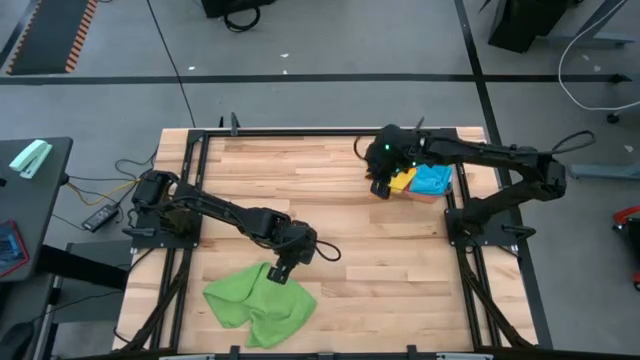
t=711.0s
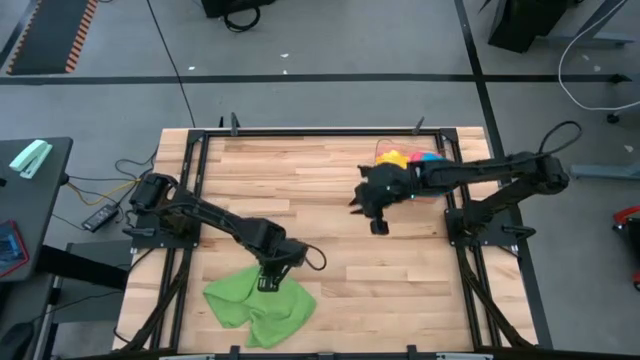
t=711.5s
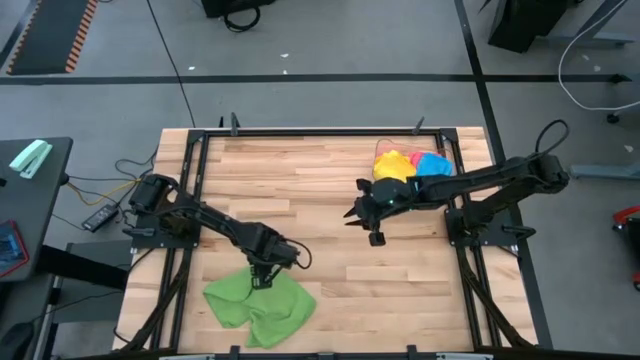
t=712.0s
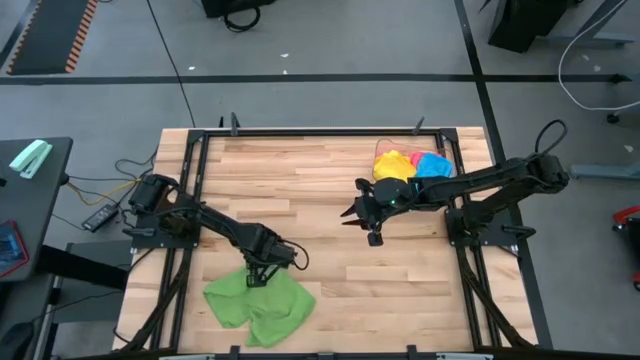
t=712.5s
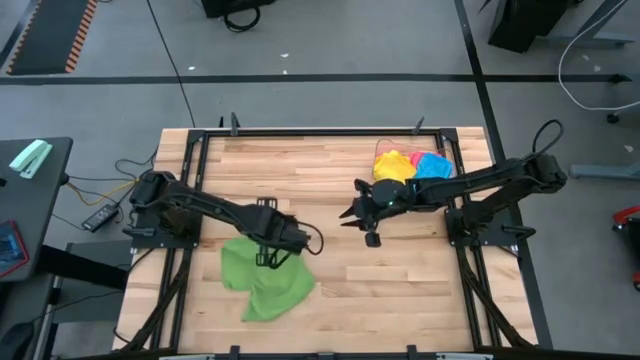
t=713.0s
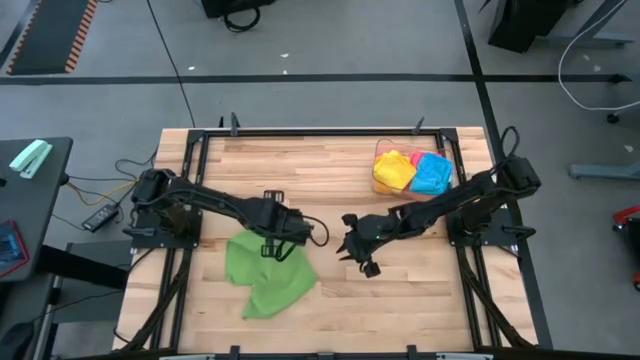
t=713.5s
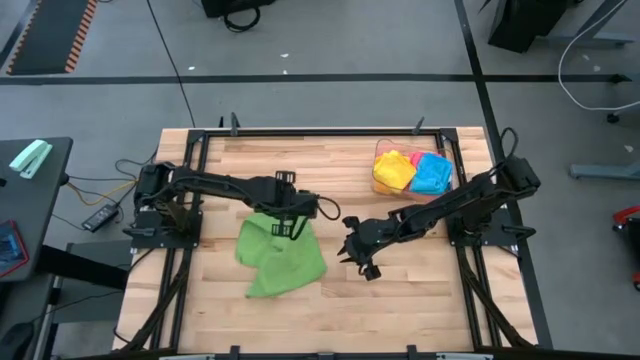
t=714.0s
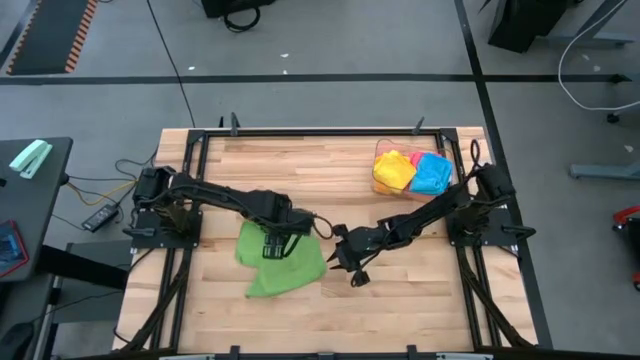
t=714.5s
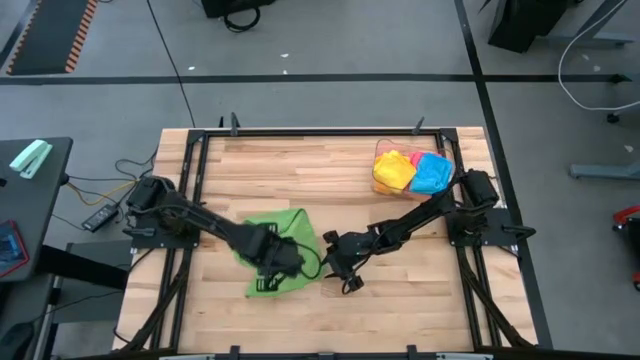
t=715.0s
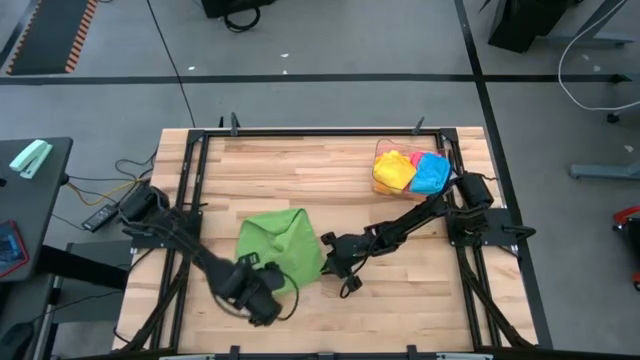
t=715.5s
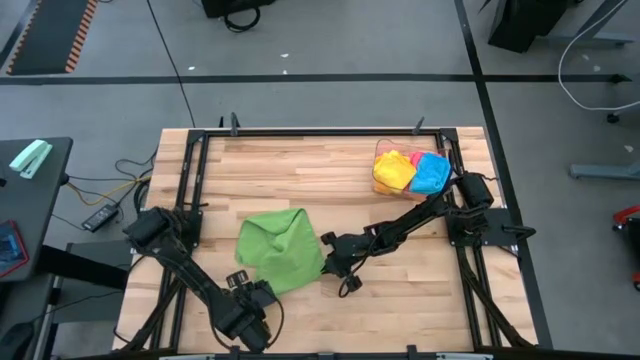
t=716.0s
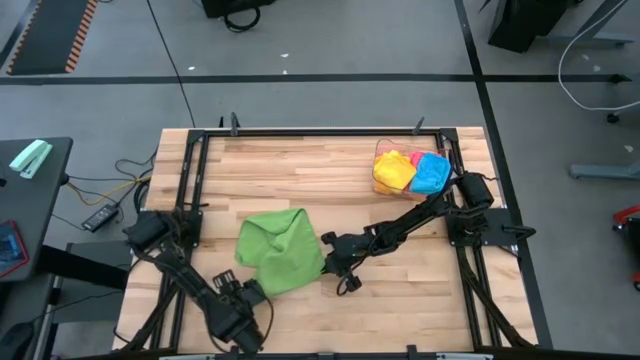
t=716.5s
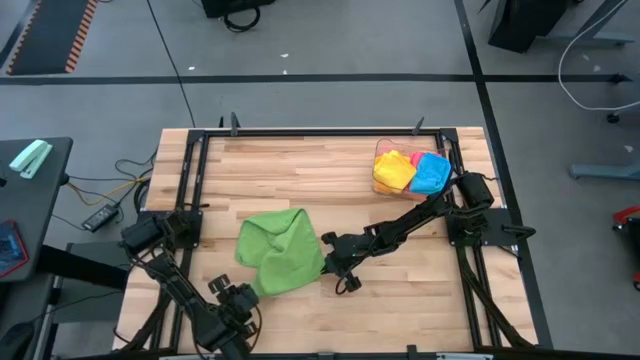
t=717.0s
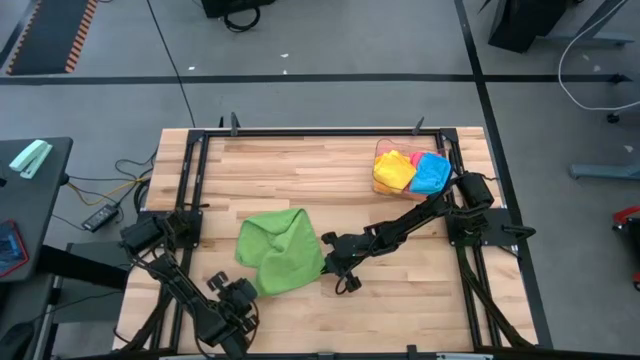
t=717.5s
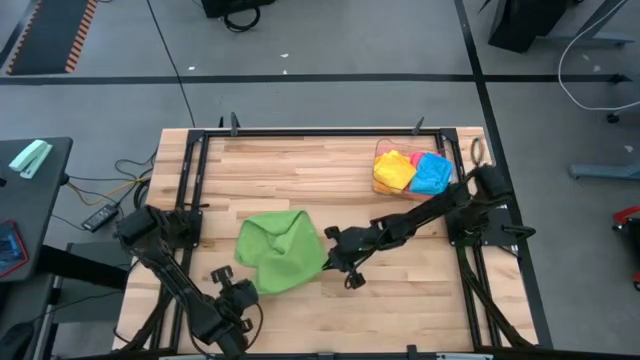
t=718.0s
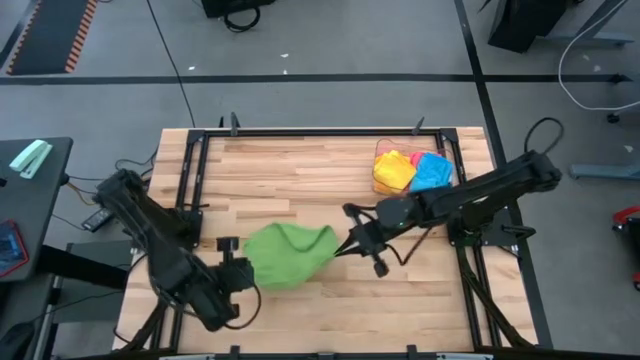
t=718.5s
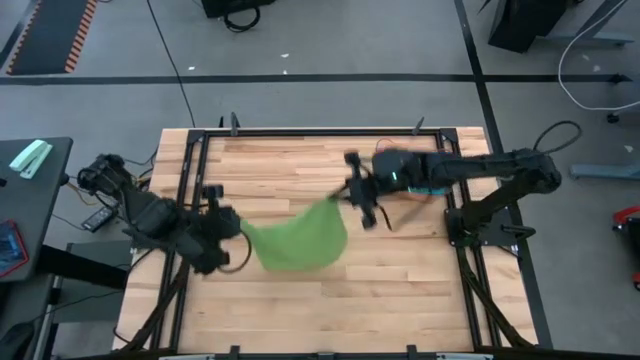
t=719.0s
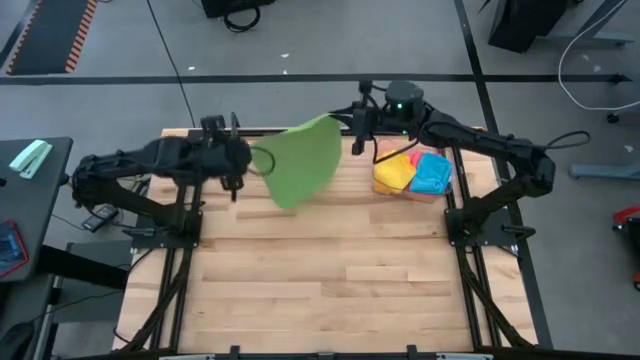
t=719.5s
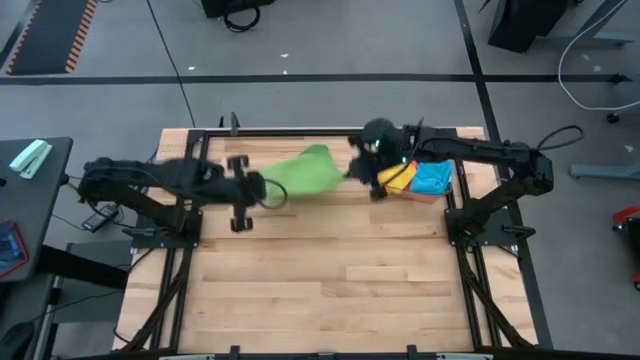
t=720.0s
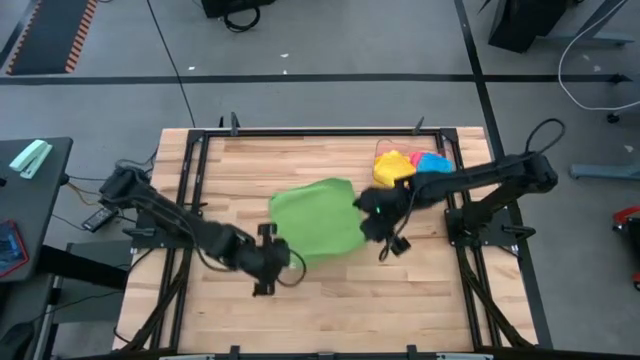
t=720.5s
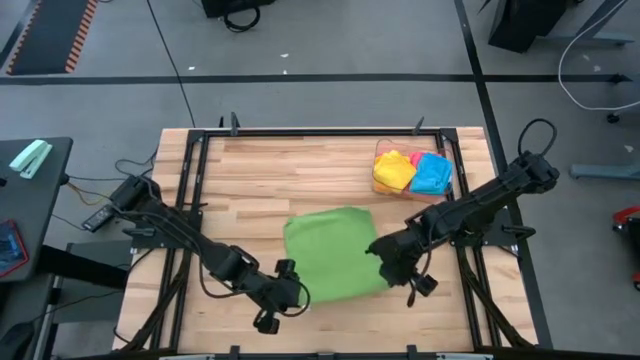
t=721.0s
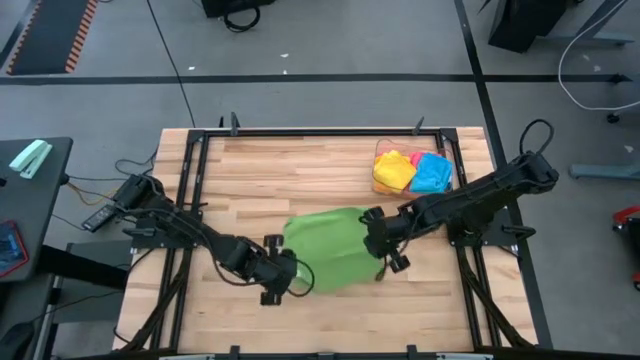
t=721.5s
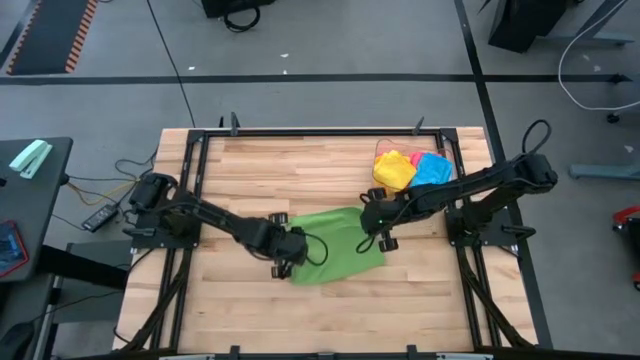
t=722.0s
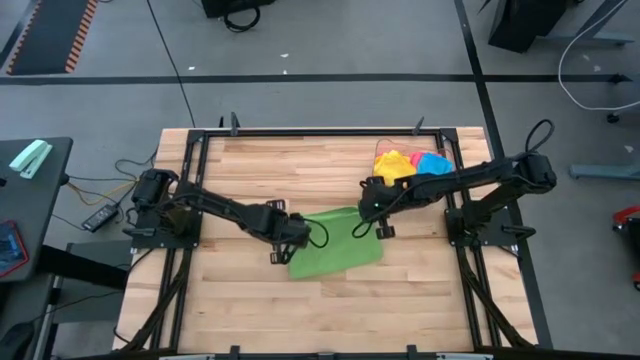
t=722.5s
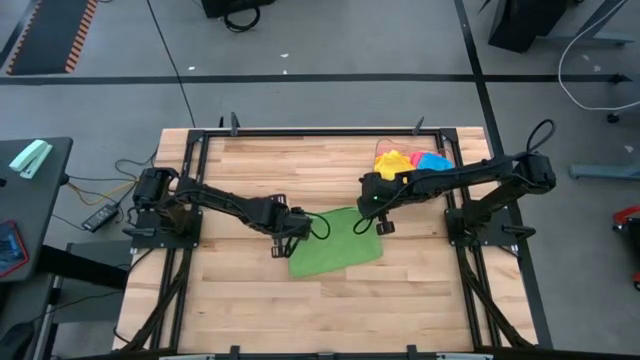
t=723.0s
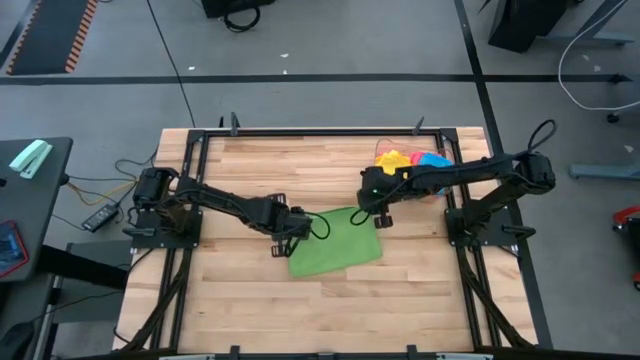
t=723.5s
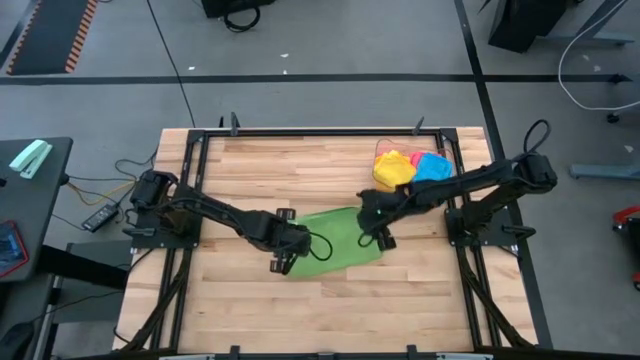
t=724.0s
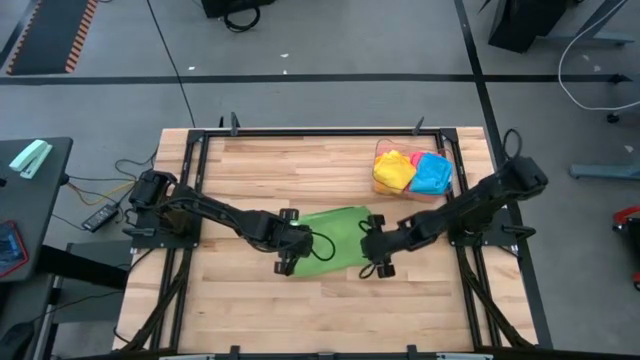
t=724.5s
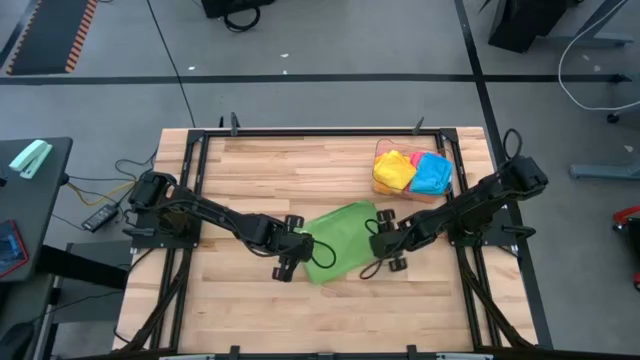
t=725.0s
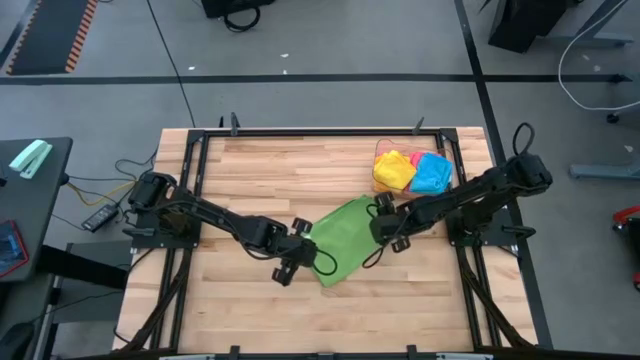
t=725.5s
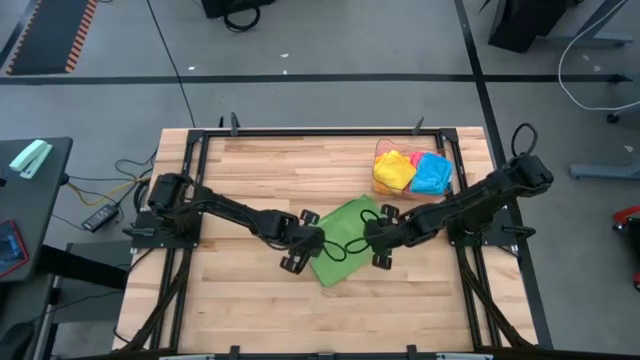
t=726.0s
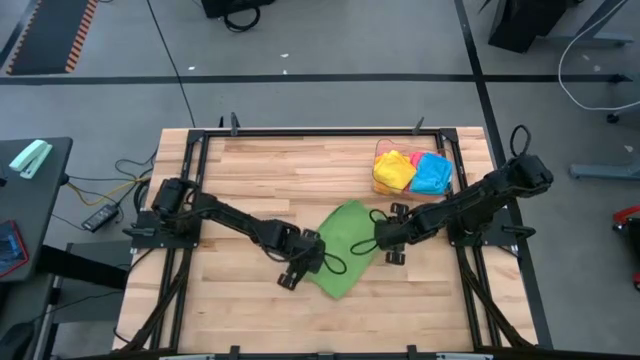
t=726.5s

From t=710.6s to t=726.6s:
Task: Fold microfiber towels
Fold the green microfiber cloth

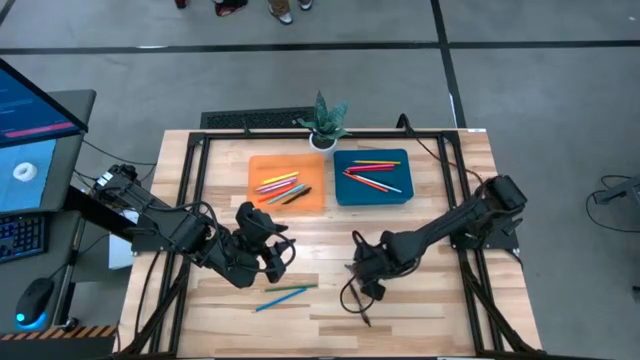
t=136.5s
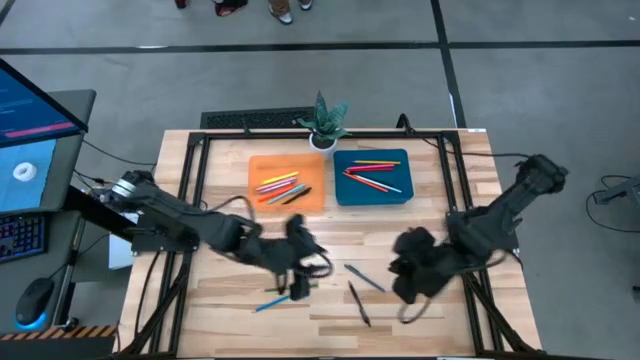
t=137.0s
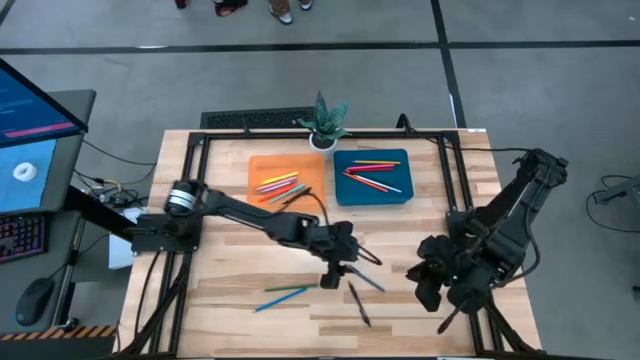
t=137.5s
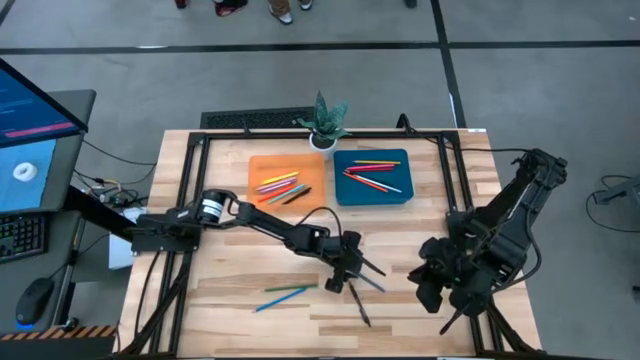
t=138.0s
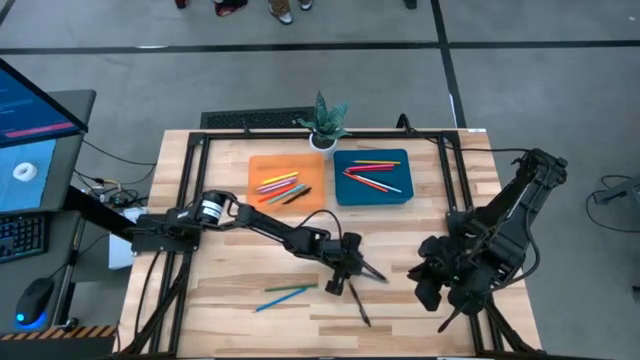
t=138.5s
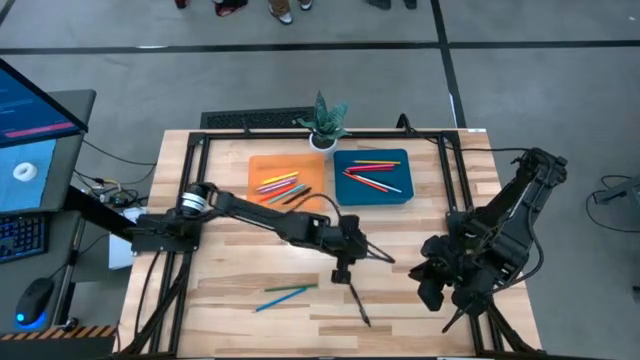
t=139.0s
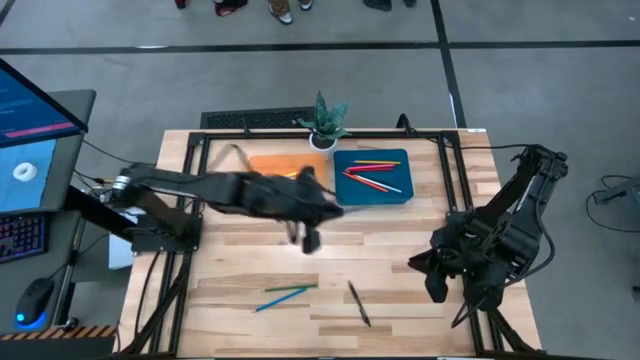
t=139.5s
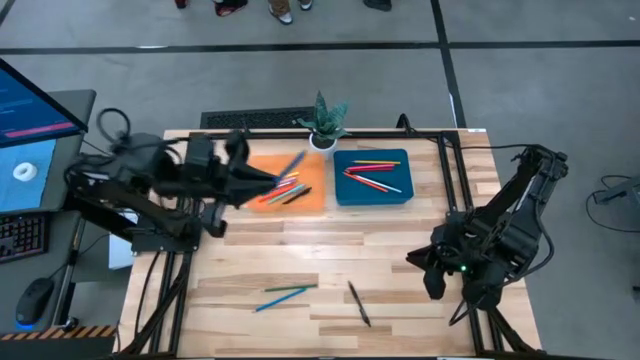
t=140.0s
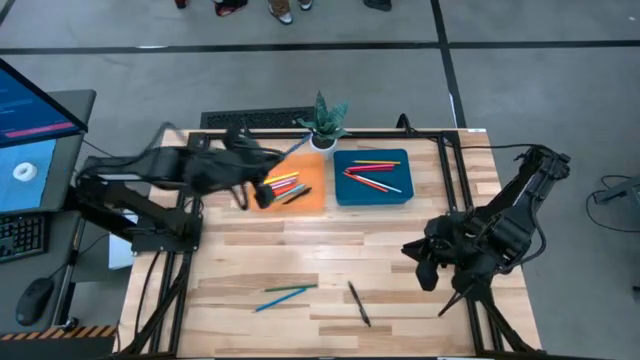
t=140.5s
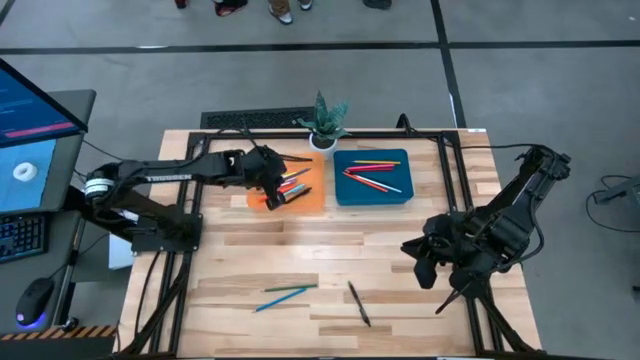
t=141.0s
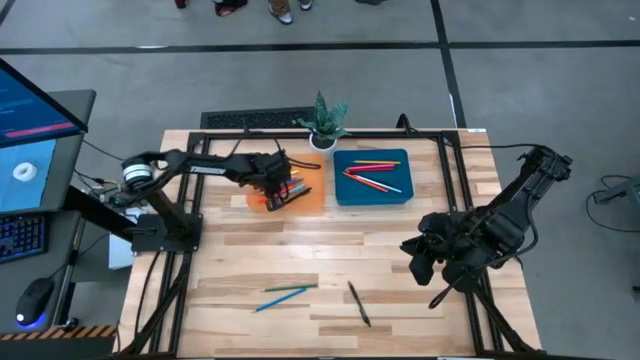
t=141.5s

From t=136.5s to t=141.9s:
Task: Sort pens & pencils
Put the blue pen into the orange bin
